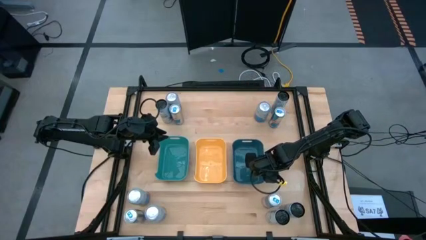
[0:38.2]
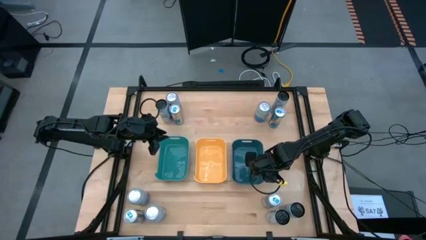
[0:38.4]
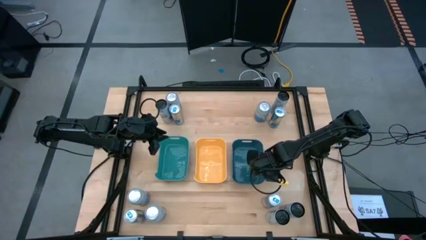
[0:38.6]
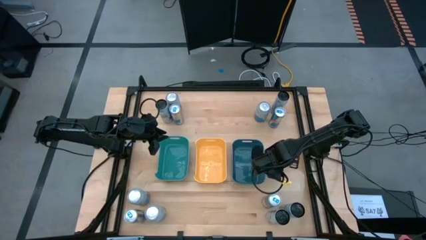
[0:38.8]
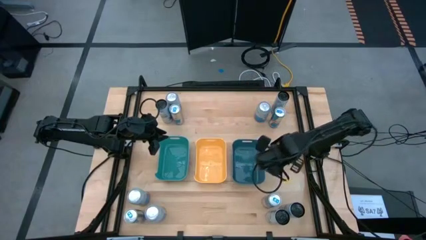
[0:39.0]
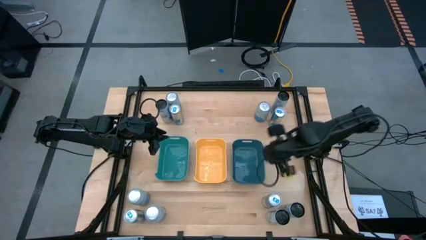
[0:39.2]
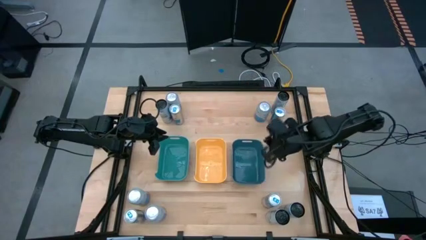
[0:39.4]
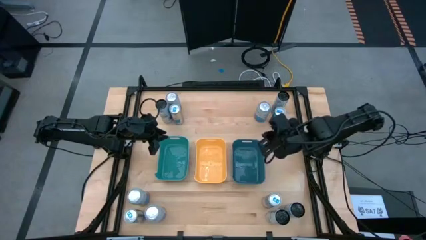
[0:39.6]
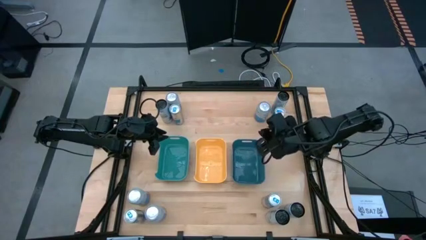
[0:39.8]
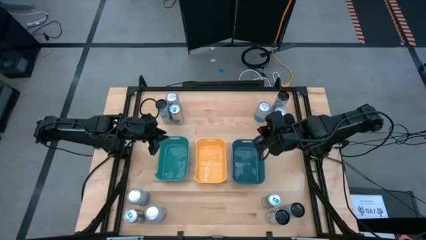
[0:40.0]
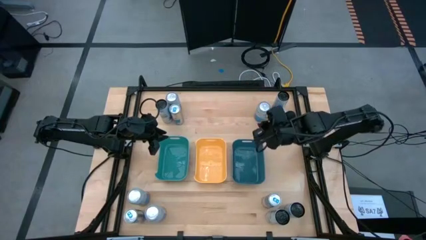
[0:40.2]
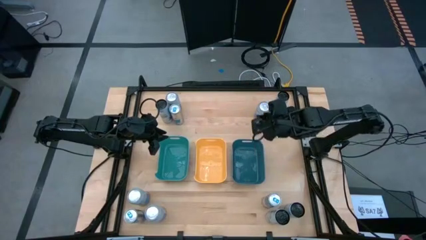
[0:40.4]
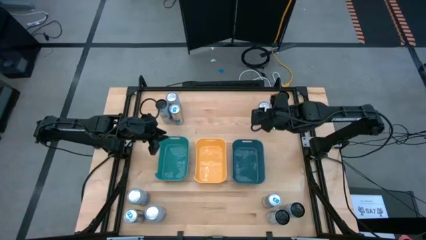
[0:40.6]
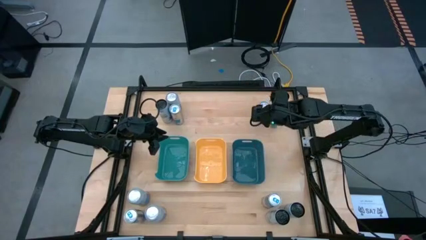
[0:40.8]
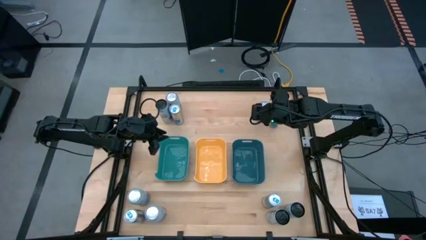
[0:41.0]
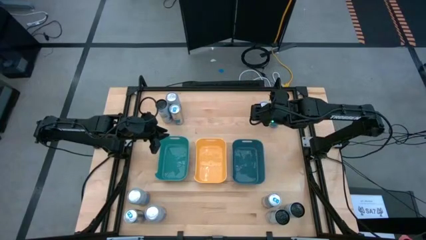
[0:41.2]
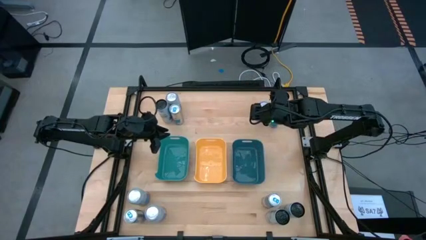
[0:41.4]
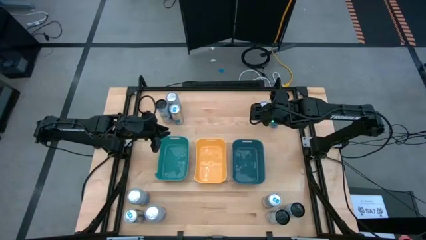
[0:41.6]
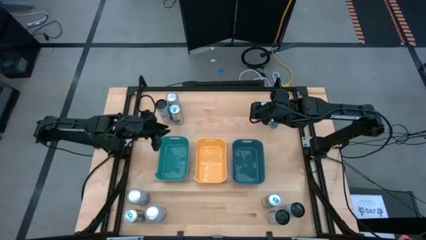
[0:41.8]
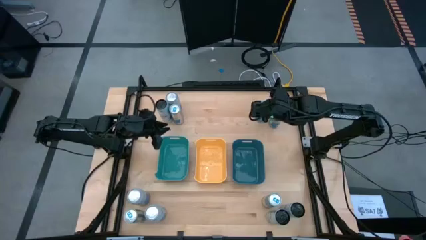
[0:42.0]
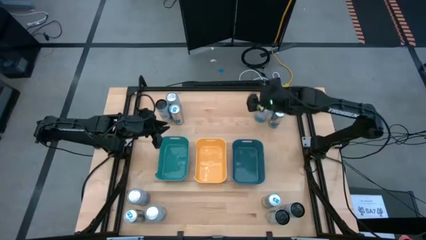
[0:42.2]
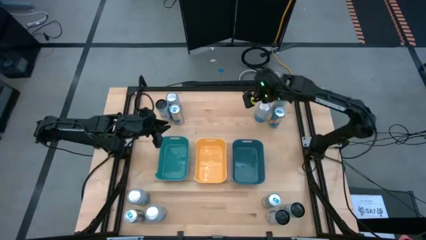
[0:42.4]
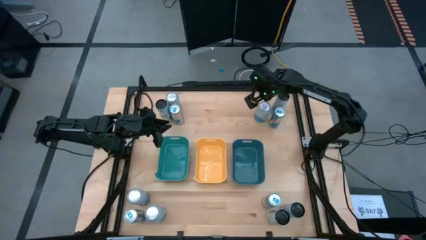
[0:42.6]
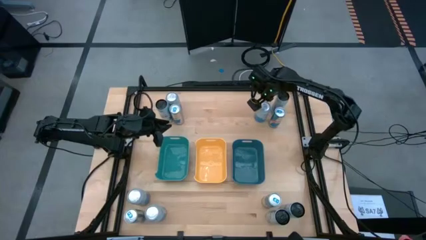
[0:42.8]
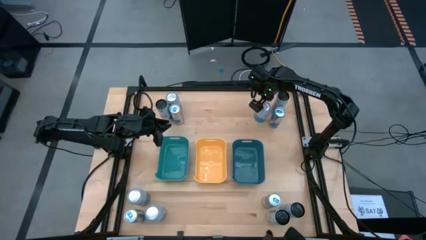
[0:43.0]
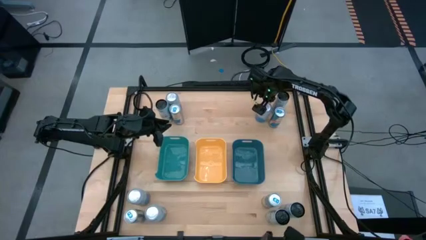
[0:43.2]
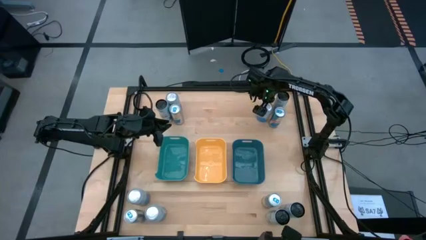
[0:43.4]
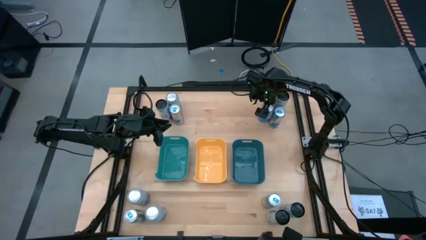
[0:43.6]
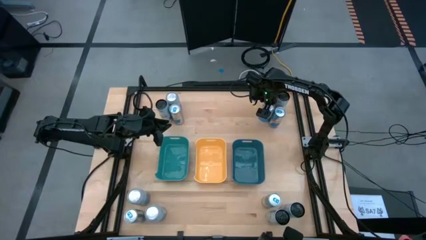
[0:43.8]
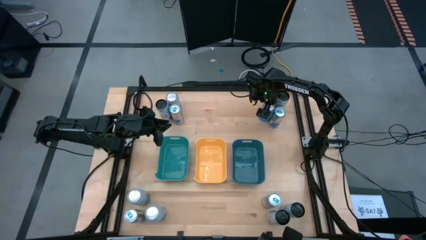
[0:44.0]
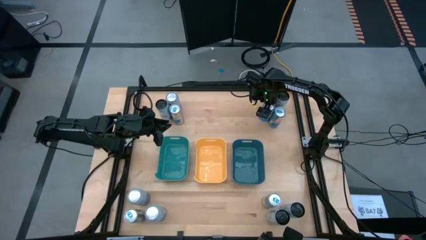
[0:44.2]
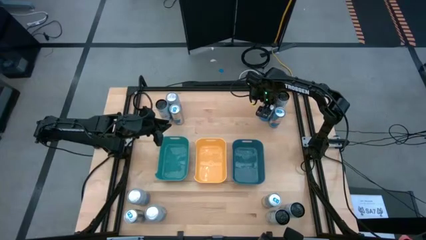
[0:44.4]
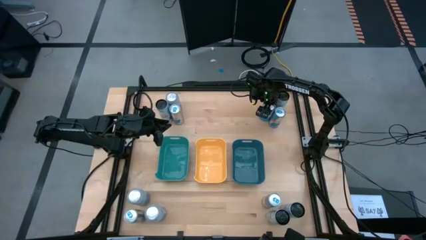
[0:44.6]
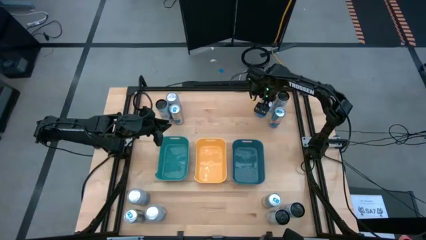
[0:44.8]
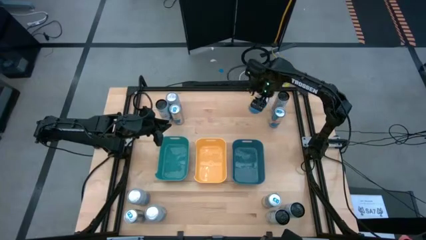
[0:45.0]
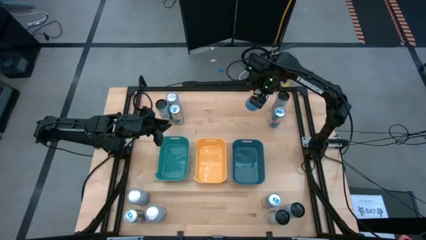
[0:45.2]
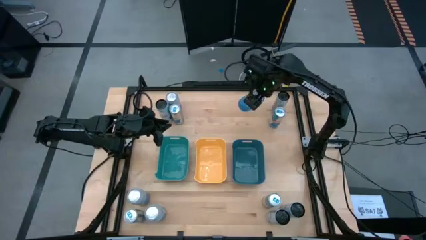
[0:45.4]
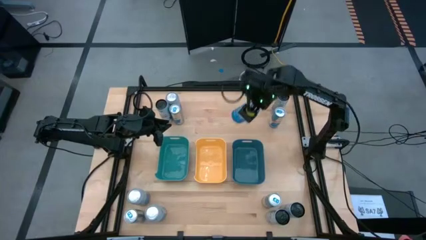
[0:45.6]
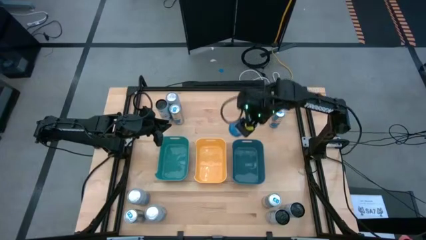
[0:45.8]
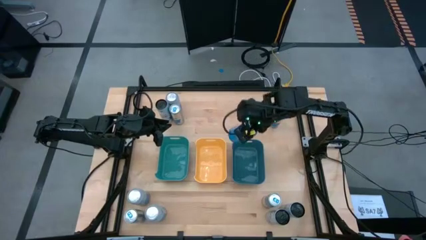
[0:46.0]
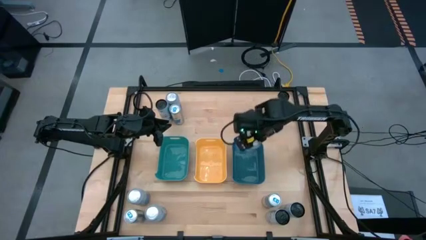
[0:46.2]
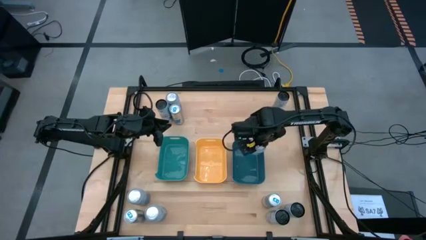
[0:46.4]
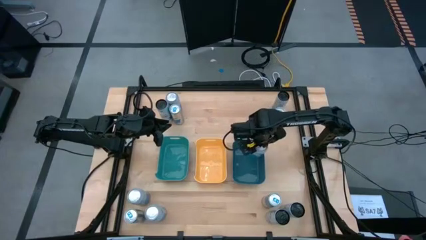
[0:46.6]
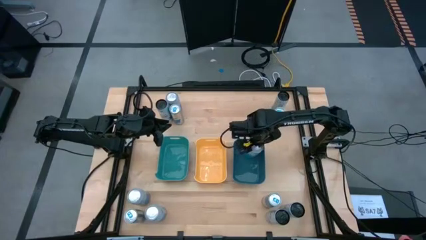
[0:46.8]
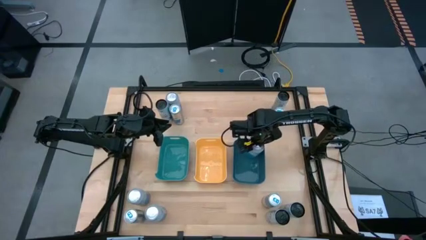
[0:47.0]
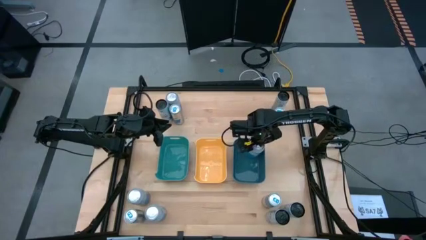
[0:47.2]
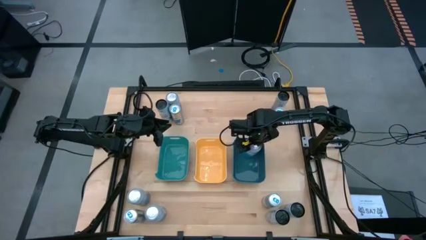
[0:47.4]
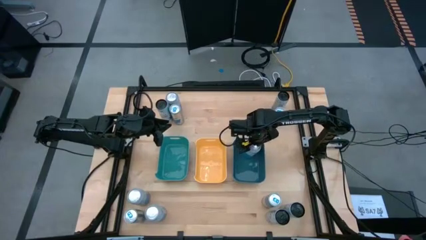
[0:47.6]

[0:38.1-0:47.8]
Task: Sort soda cans
Put the top right silver can into the dark green bin

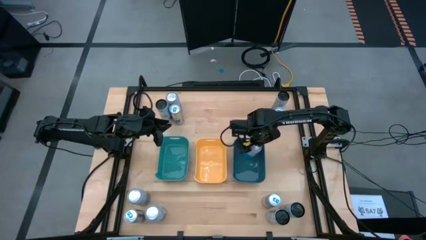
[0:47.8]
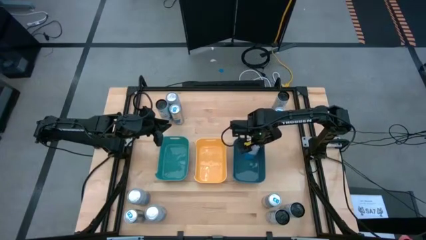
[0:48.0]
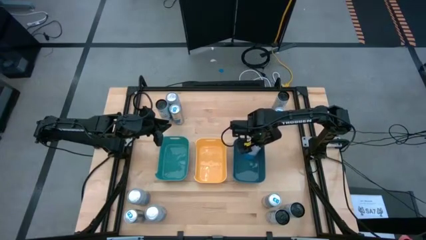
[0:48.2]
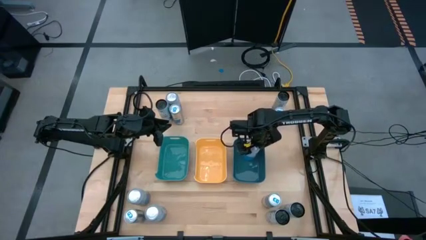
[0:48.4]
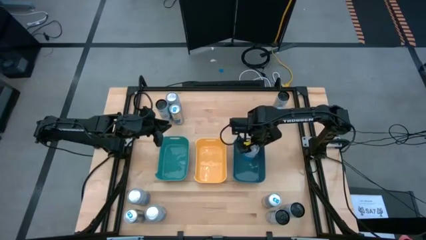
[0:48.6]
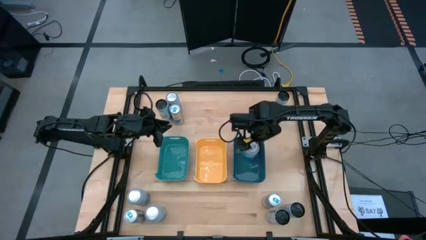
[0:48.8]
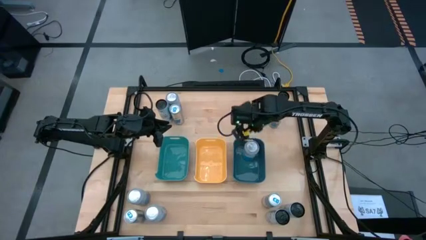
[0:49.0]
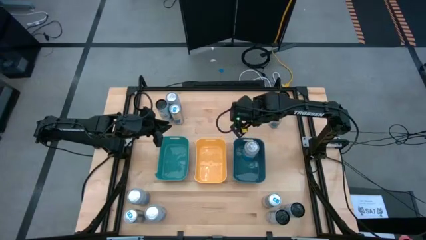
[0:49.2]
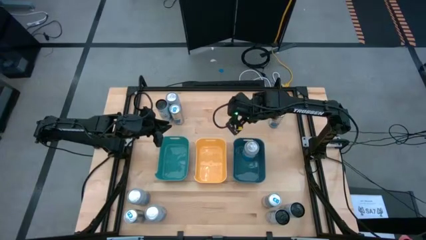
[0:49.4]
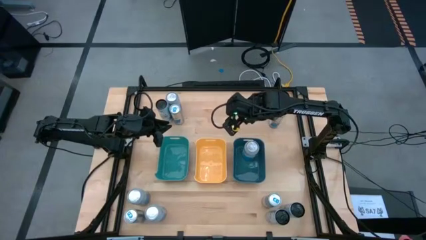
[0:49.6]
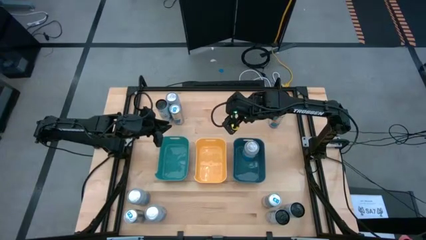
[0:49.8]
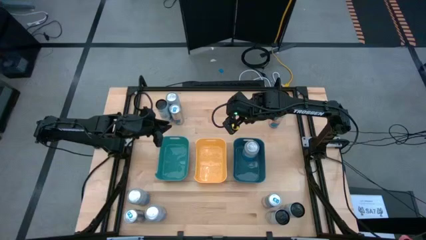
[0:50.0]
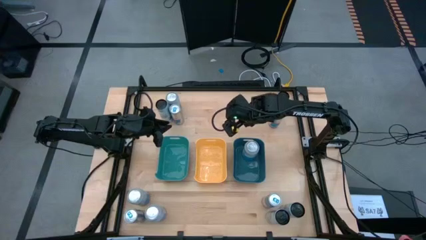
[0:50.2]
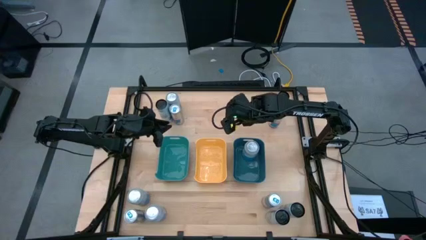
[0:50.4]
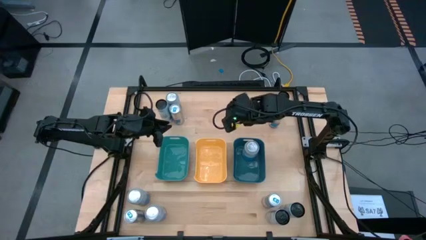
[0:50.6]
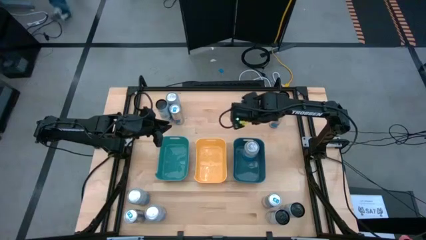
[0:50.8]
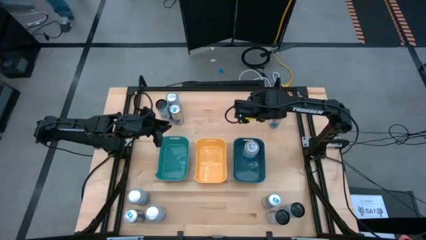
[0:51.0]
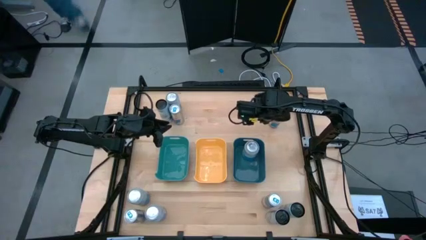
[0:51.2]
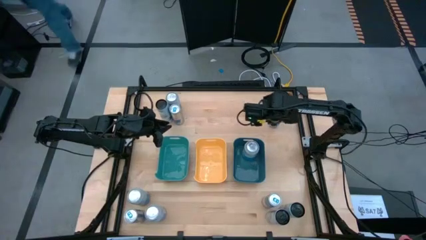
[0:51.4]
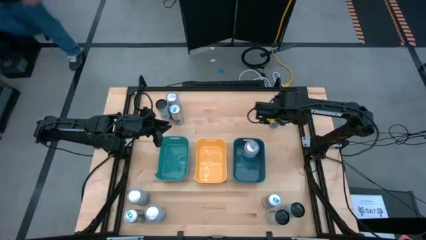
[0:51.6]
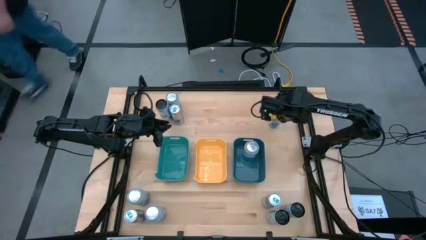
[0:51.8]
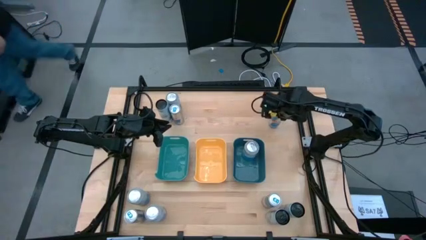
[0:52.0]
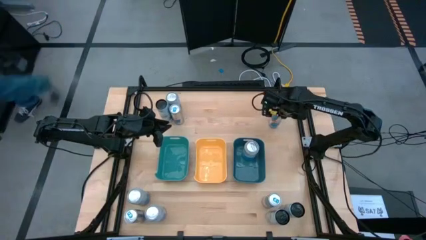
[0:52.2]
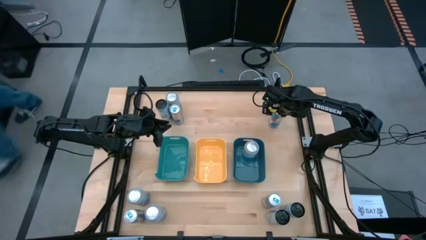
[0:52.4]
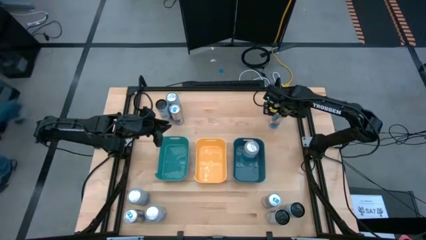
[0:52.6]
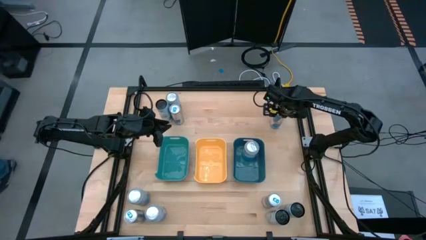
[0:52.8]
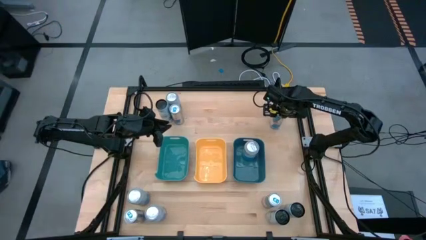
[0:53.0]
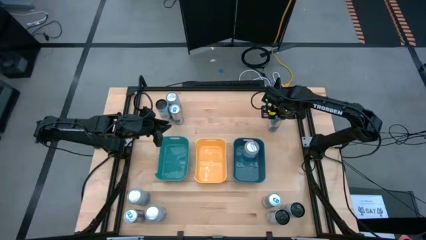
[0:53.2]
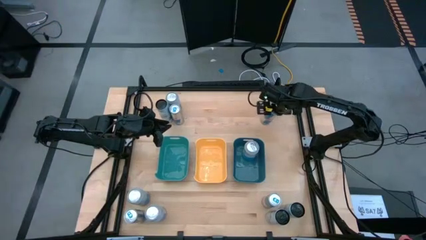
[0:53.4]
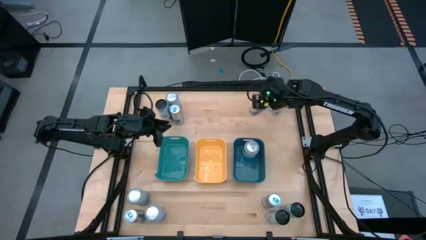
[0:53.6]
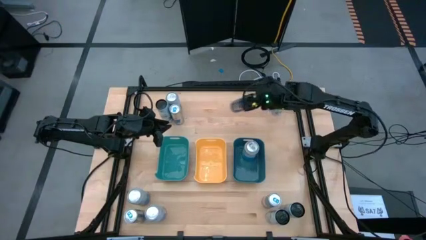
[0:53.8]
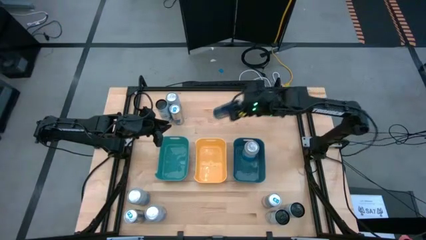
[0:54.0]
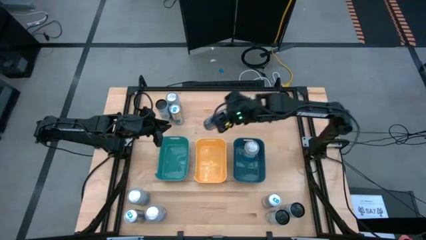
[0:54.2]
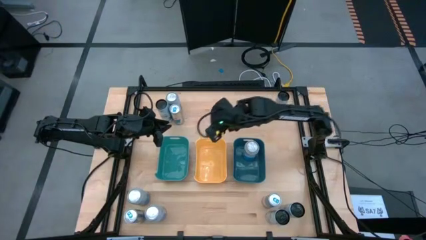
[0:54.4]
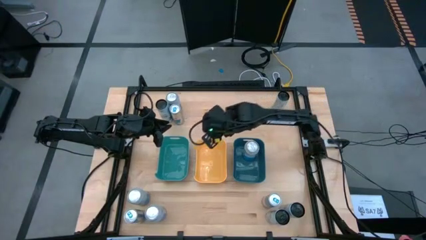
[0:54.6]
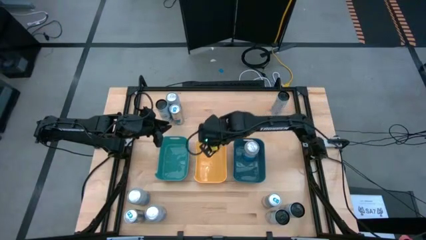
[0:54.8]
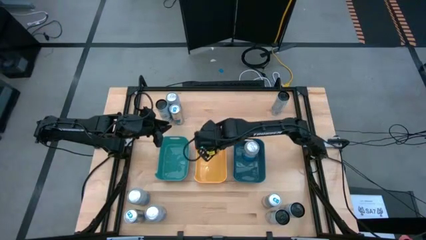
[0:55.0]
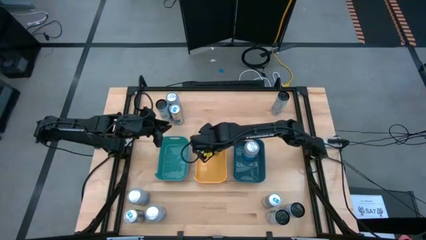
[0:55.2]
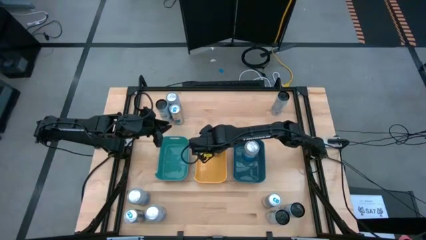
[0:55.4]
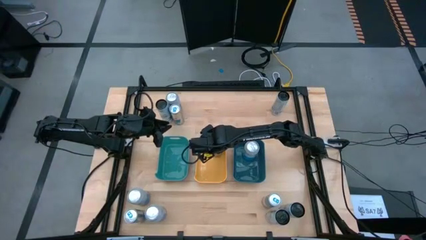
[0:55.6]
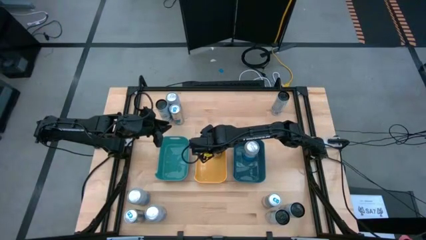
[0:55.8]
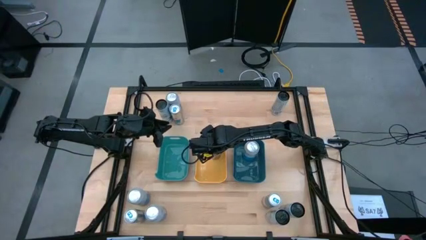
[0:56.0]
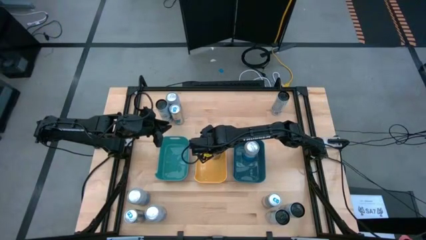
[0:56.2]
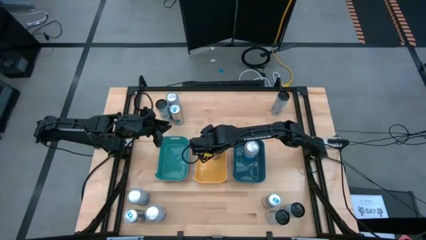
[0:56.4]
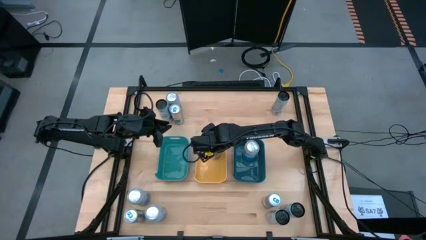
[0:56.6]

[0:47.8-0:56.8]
Put the top right blue can into the yellow bin
